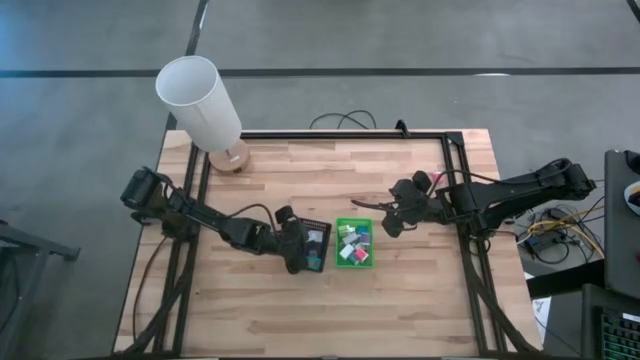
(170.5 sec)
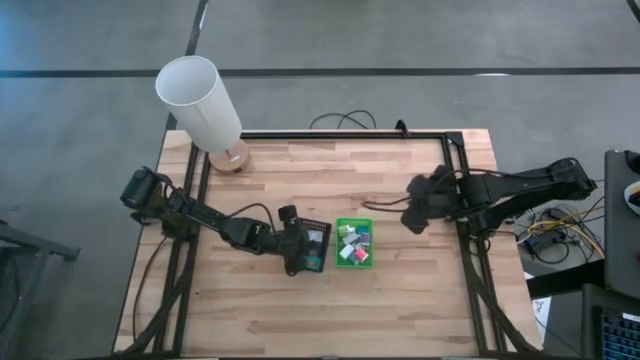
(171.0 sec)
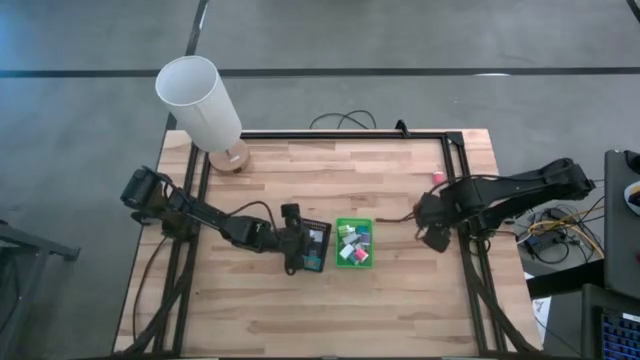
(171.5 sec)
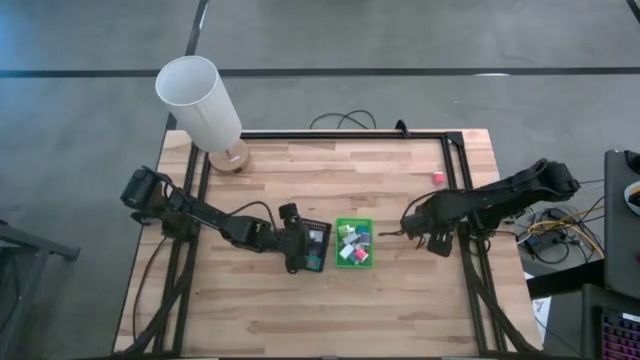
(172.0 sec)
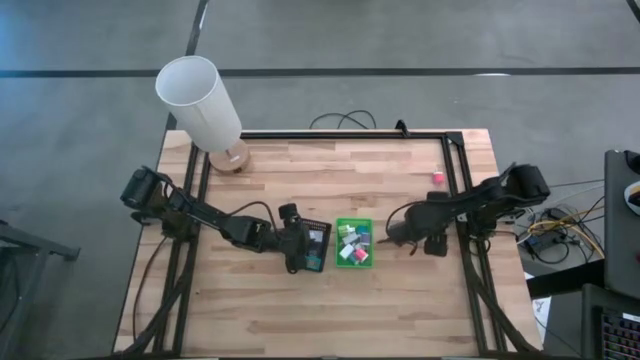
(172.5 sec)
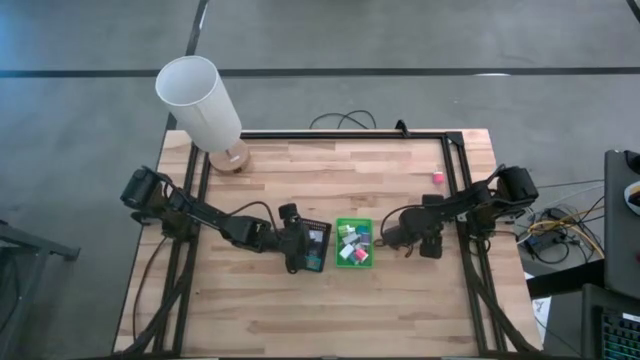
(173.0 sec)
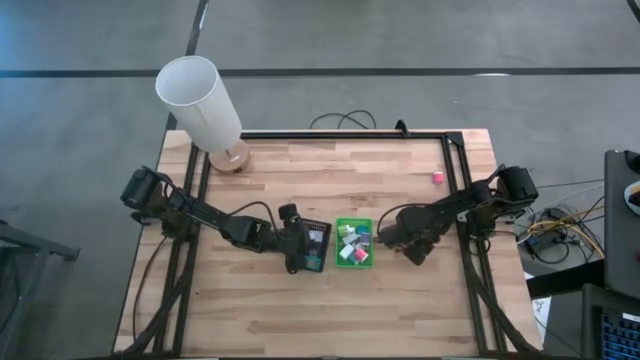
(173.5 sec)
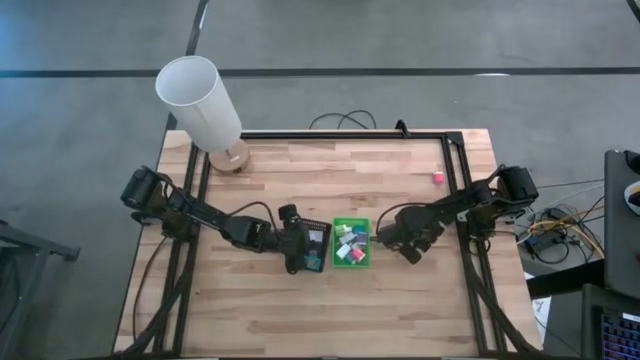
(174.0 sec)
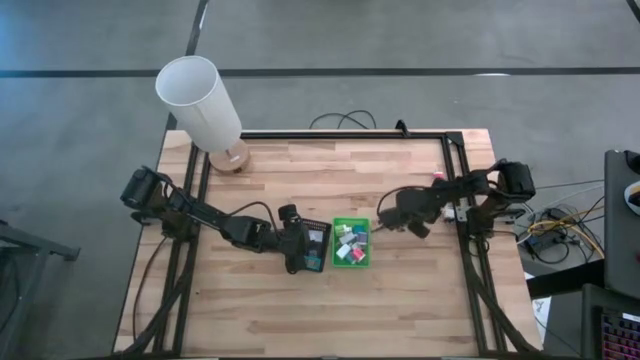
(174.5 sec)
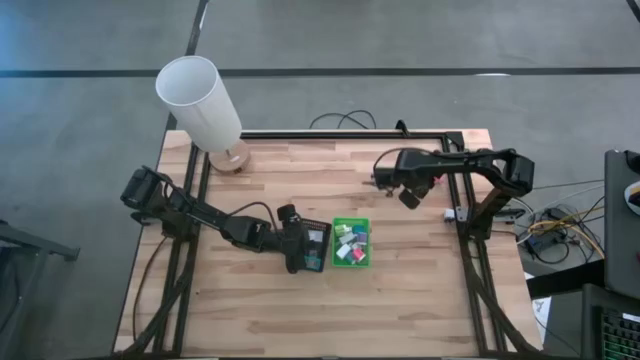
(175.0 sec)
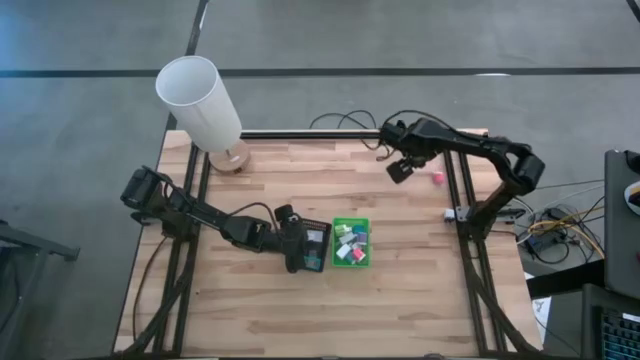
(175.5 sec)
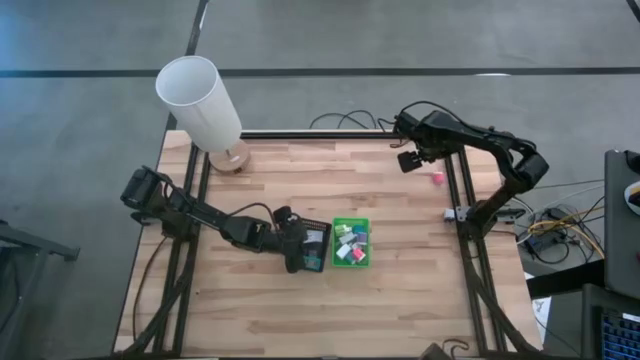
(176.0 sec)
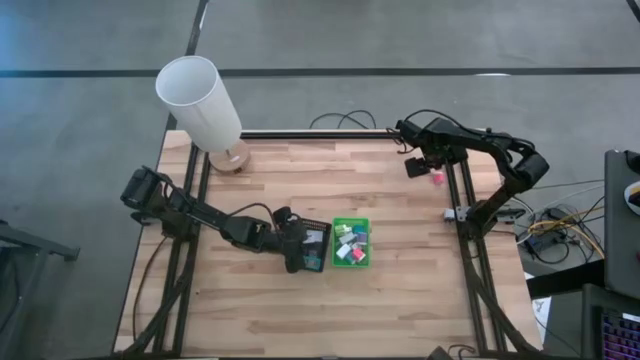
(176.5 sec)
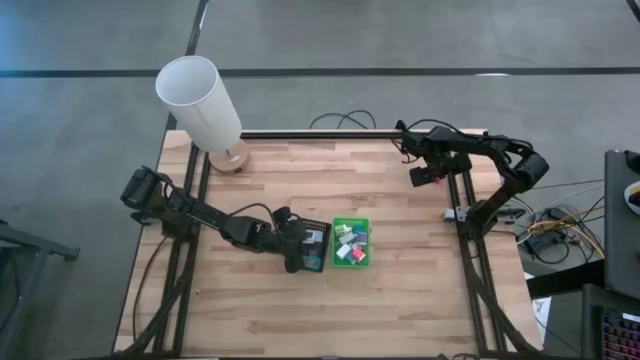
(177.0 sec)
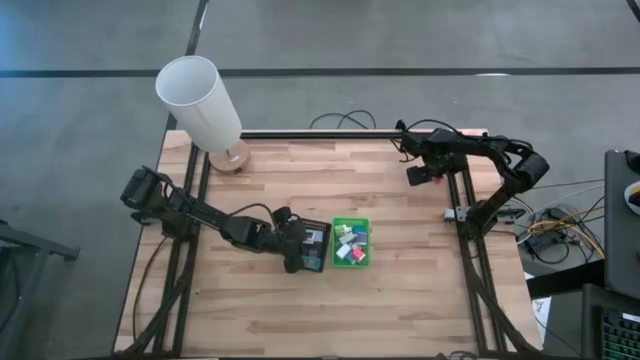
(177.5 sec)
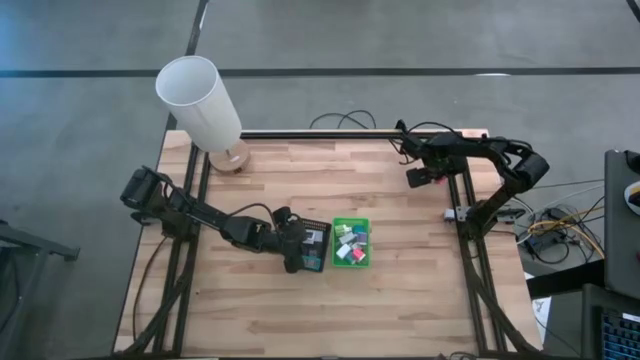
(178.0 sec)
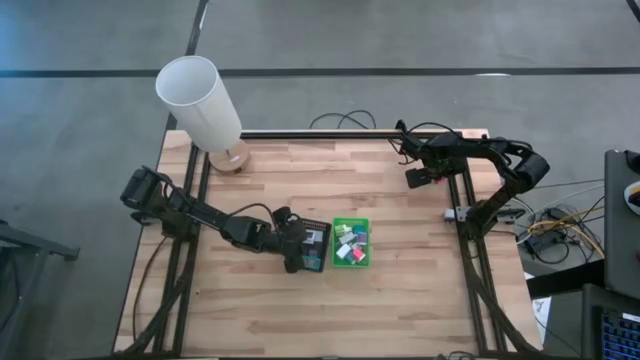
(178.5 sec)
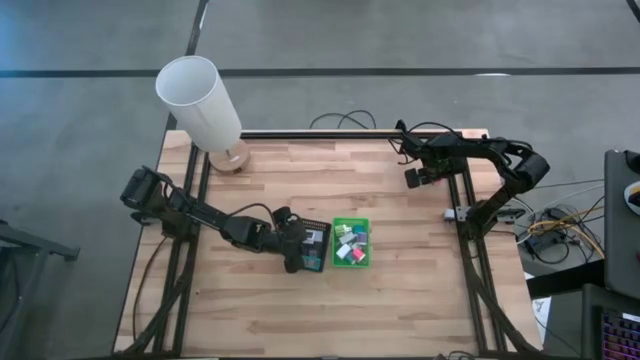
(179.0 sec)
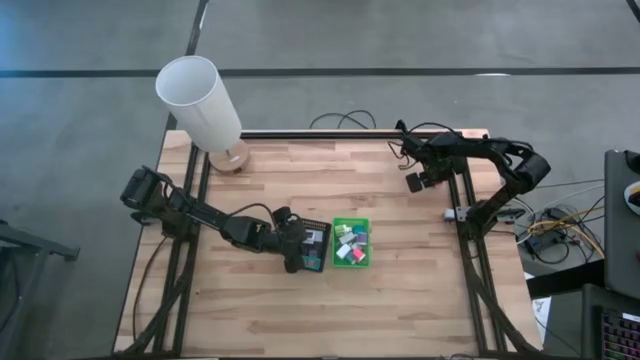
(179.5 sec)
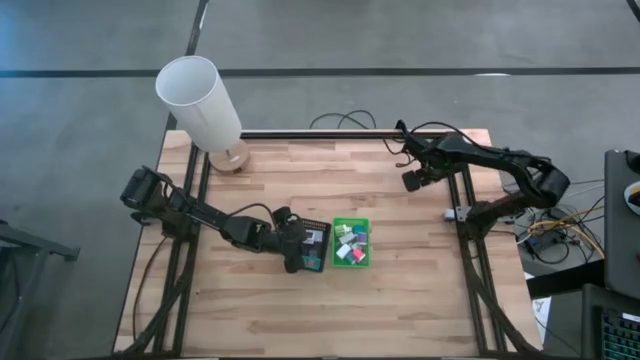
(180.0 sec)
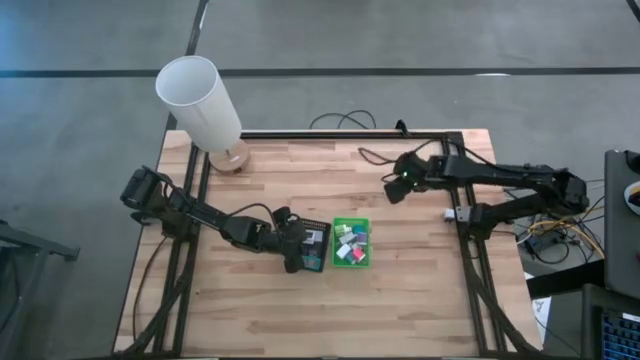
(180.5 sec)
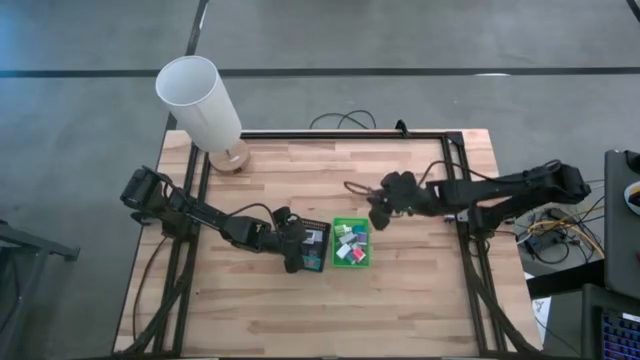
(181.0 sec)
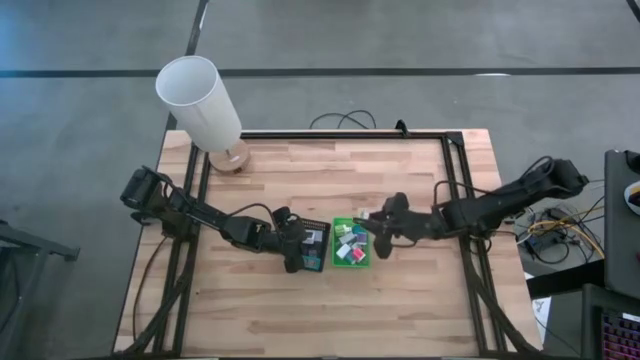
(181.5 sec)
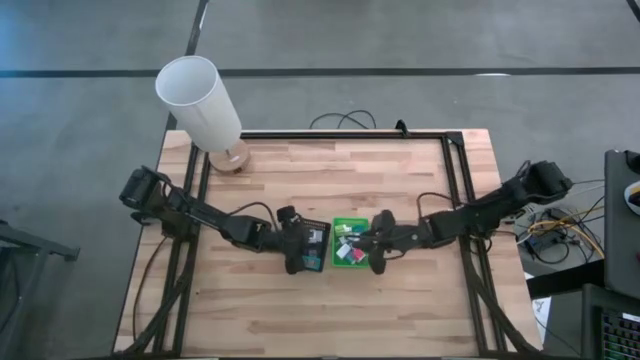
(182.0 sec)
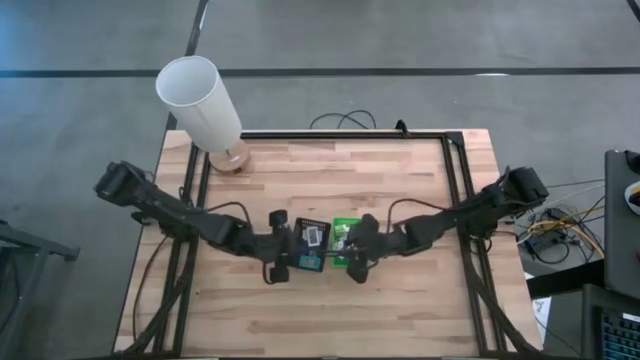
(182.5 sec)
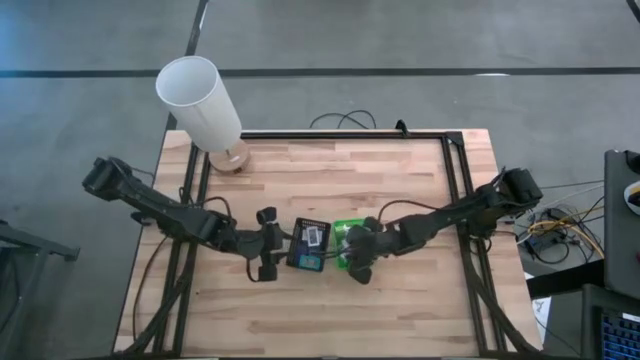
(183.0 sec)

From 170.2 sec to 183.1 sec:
Task: Pick & Place Office items
Put the pink charger adapter into the green basket

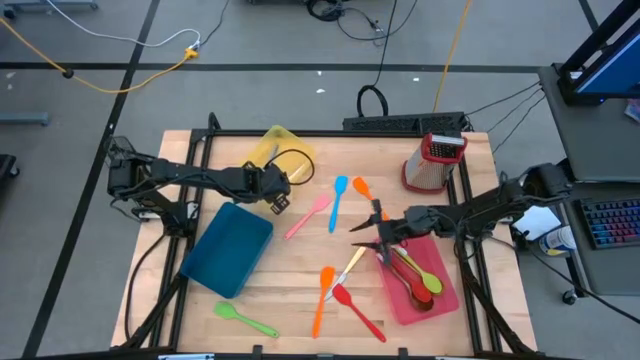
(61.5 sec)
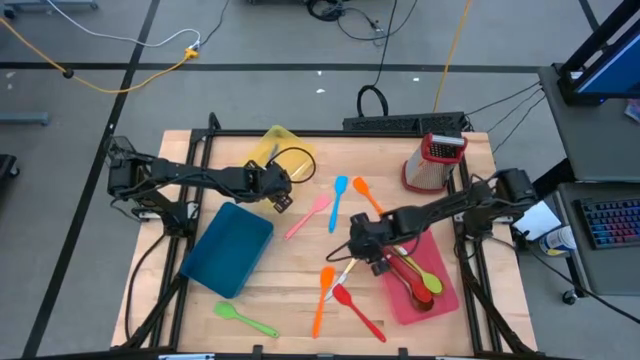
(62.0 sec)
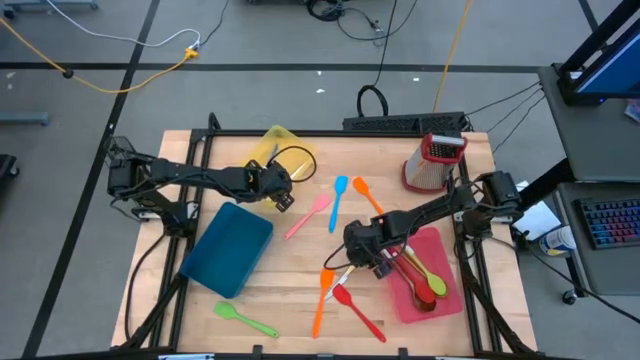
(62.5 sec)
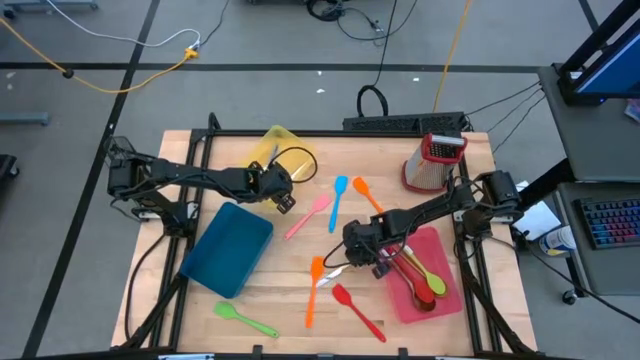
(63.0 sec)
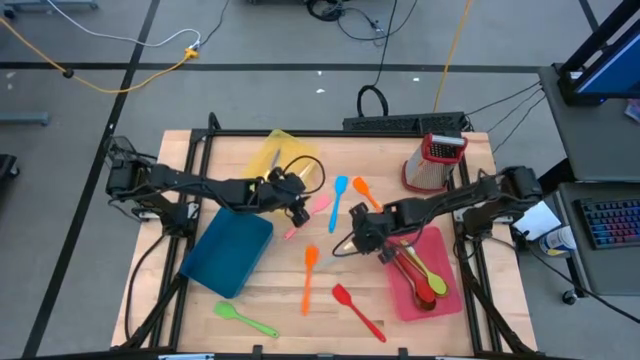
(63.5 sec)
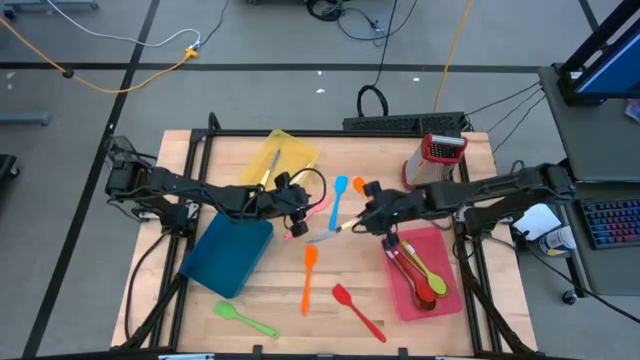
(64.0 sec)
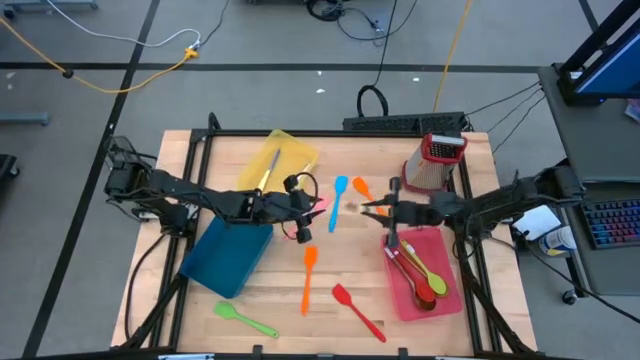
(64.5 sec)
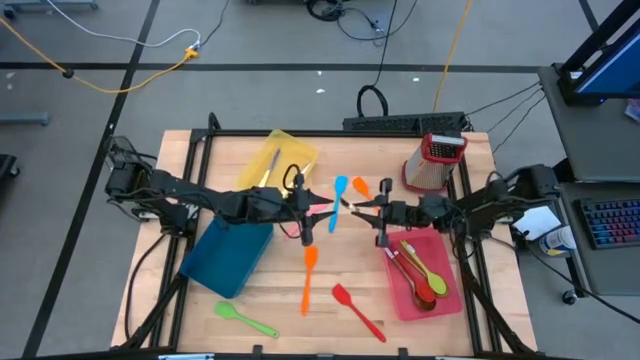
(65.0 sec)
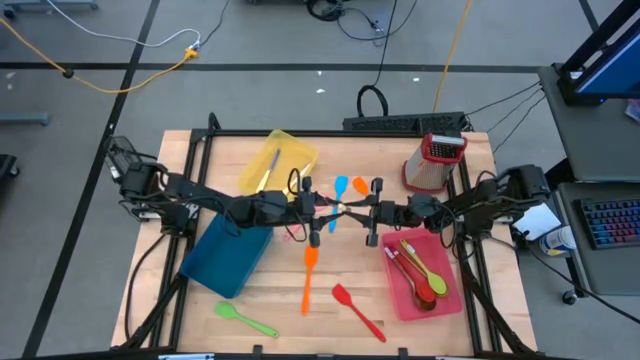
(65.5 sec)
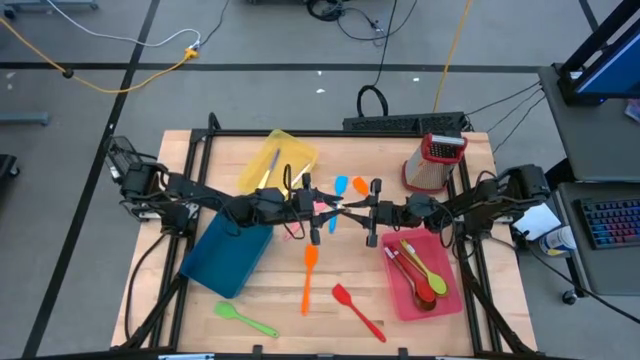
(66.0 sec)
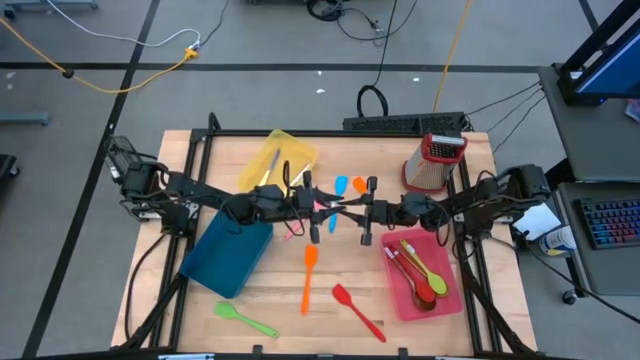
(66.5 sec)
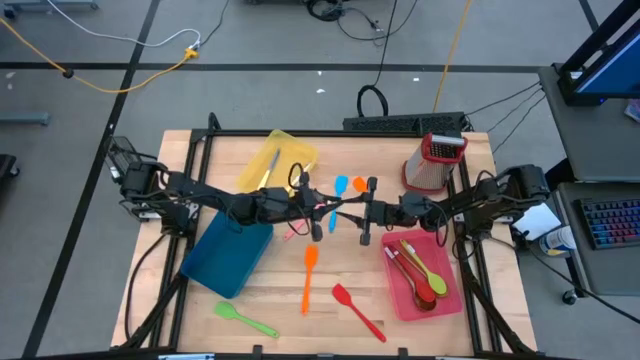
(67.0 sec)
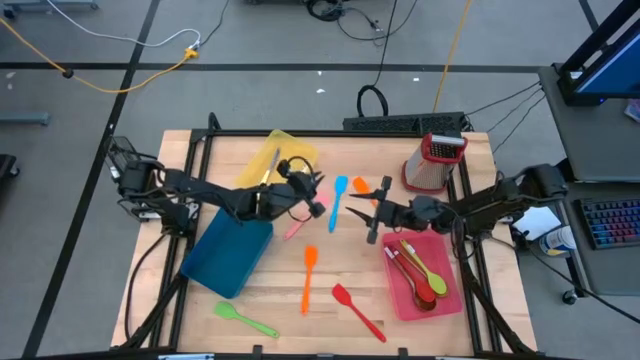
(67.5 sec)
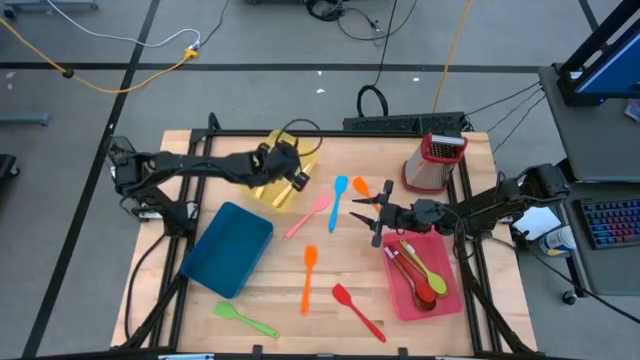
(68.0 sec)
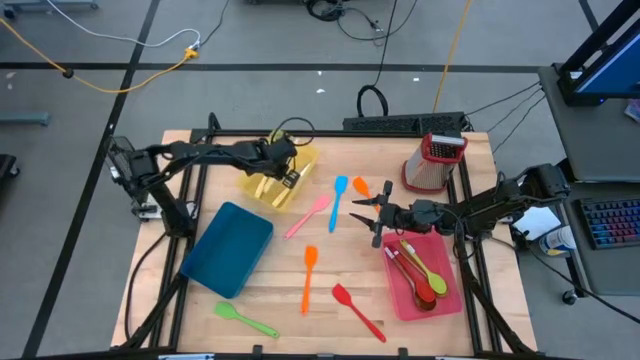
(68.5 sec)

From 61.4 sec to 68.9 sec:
Task: Pick & Place Kitchen Items
Put the yellow knife into the yellow bin
